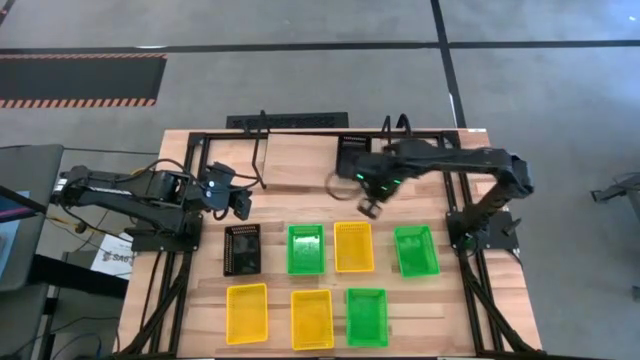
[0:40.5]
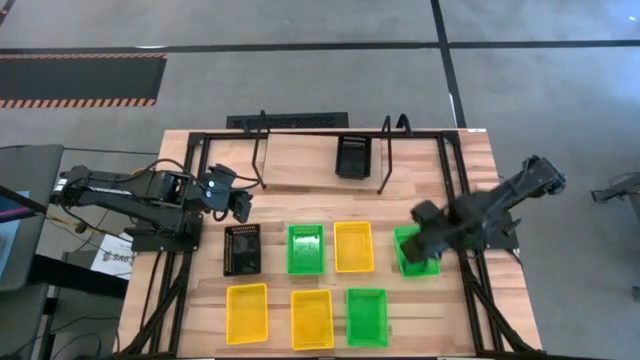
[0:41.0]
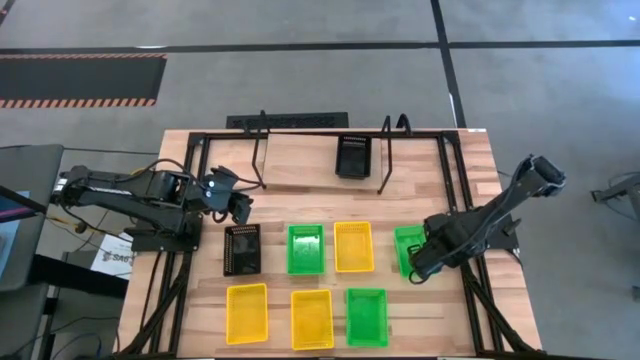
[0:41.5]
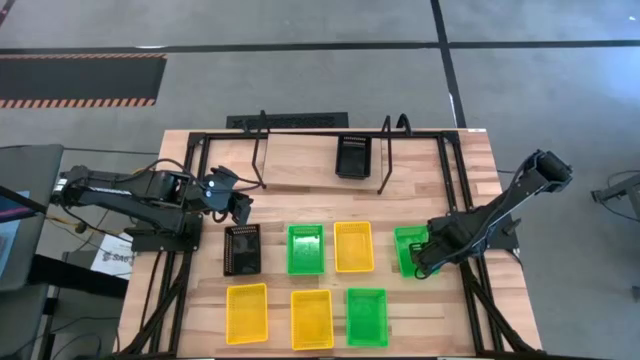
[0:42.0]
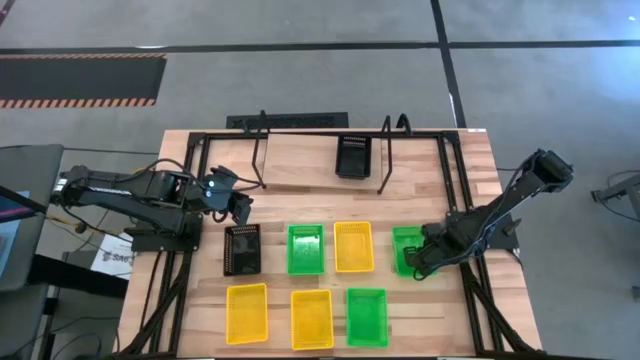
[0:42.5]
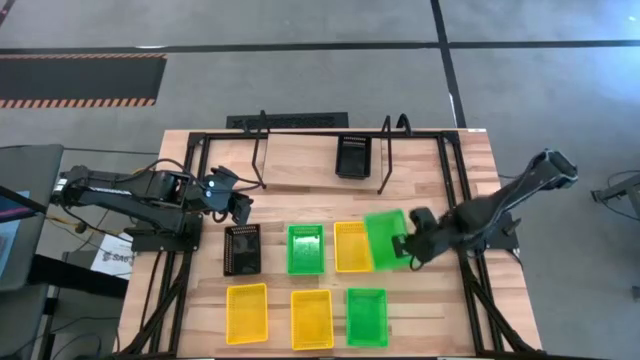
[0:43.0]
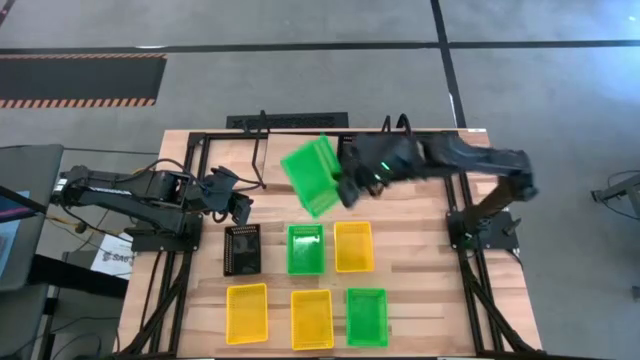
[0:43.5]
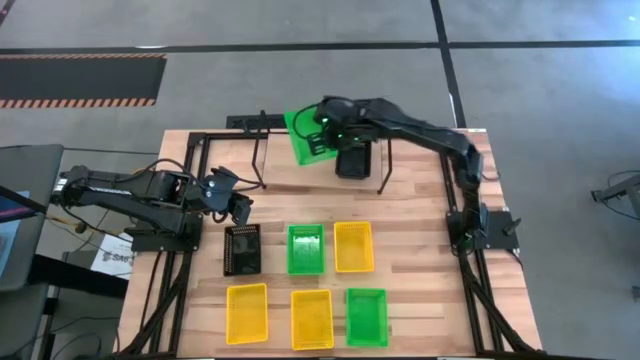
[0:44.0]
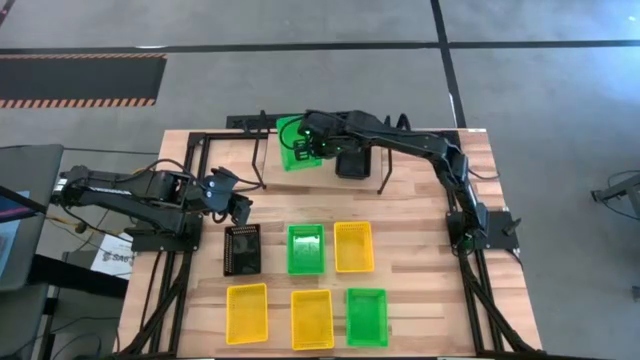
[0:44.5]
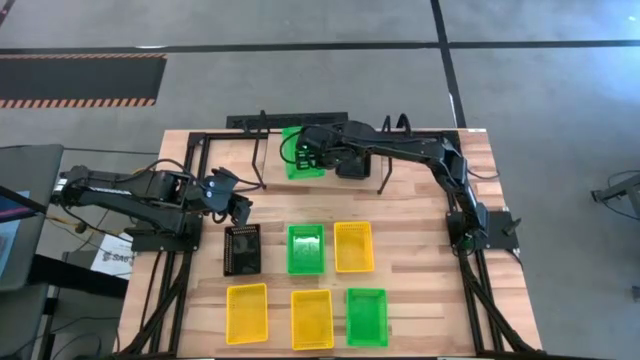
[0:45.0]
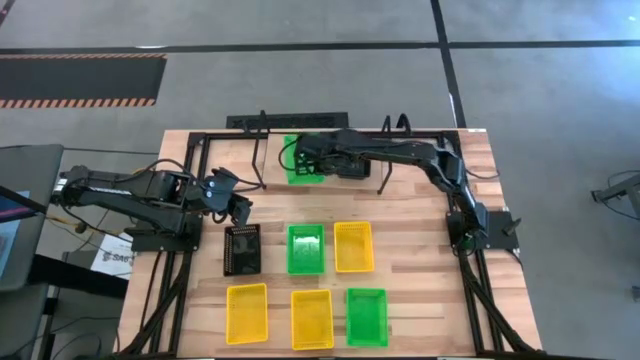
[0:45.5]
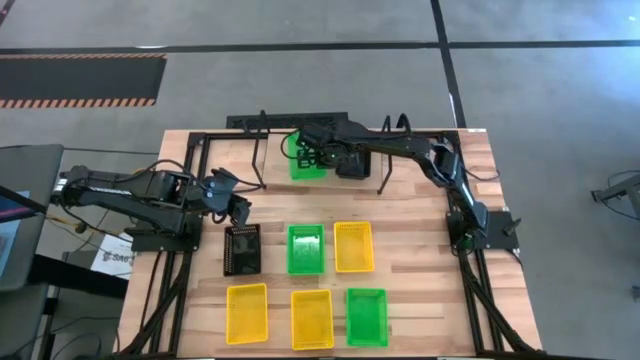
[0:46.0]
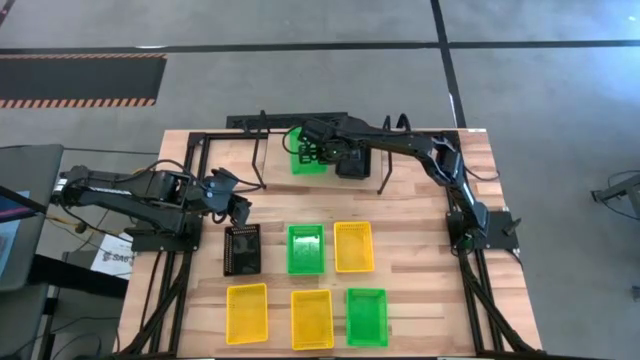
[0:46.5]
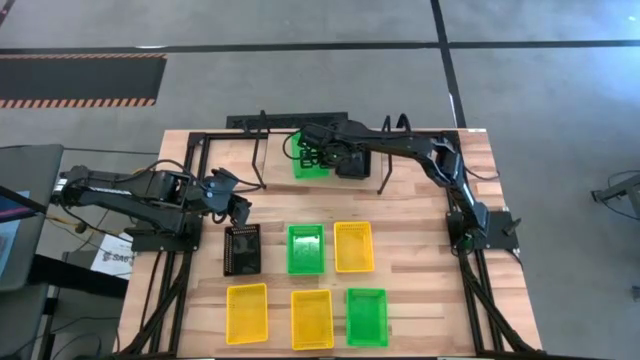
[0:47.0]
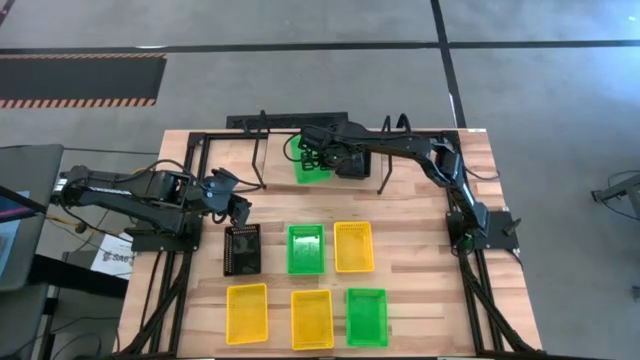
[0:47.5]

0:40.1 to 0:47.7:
Task: Stack baskets on shelf by color
Put the right green basket on top of the black basket on the shelf

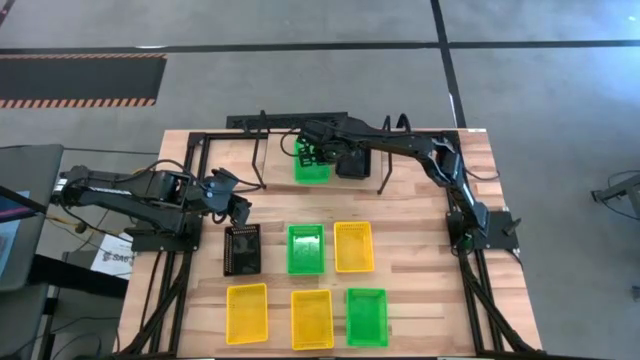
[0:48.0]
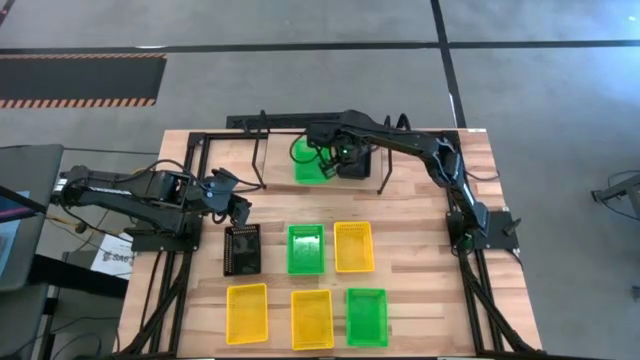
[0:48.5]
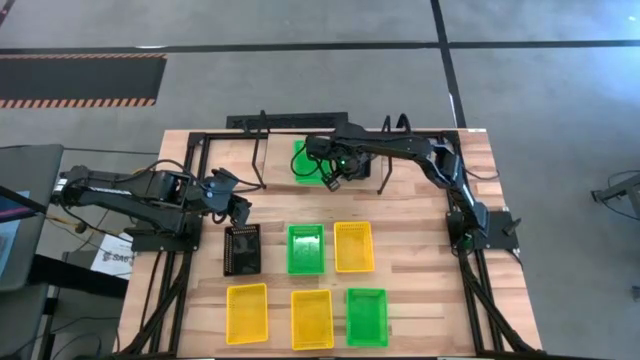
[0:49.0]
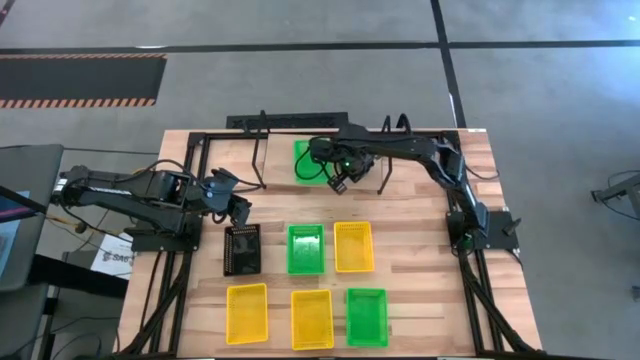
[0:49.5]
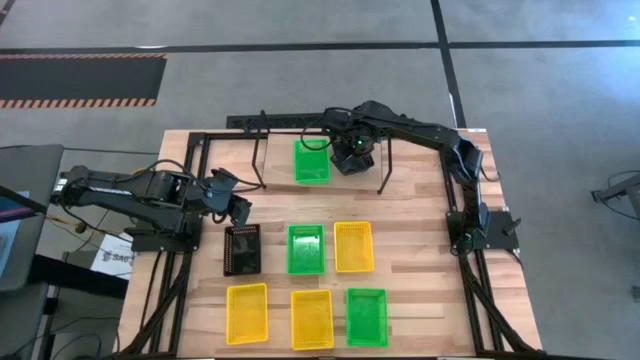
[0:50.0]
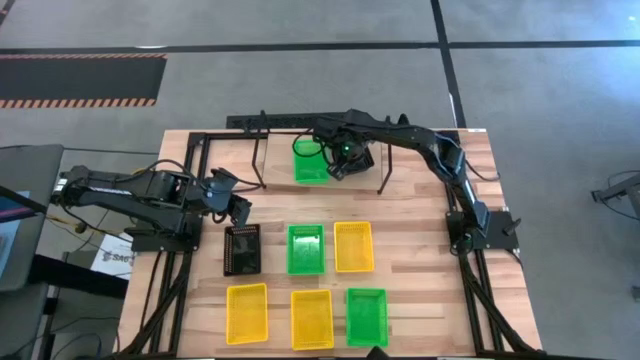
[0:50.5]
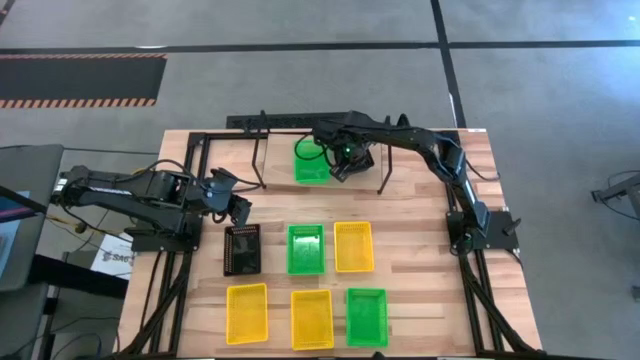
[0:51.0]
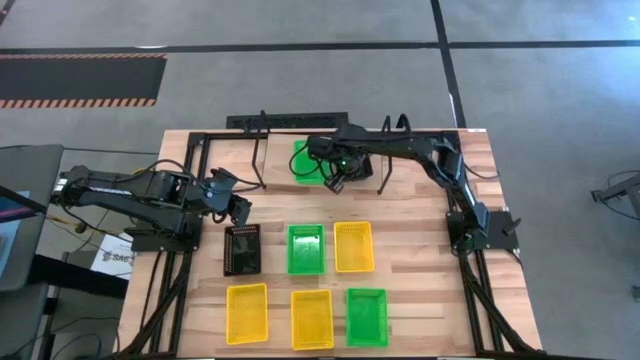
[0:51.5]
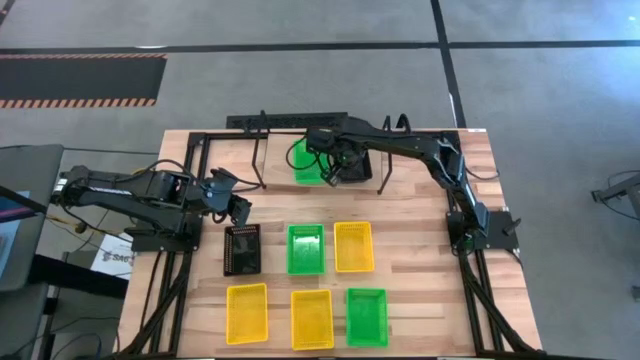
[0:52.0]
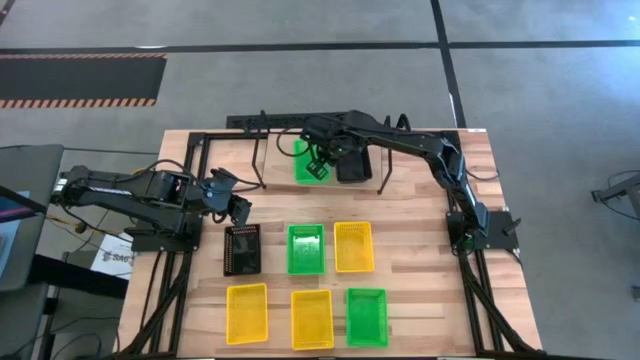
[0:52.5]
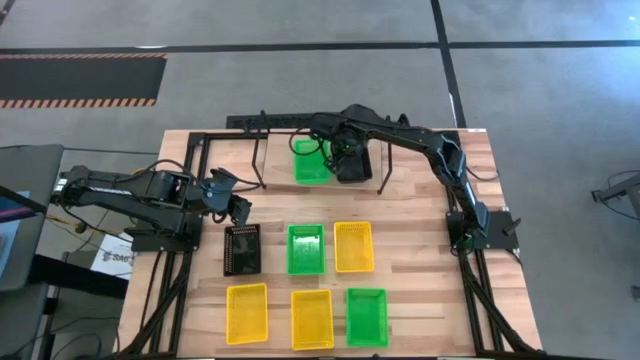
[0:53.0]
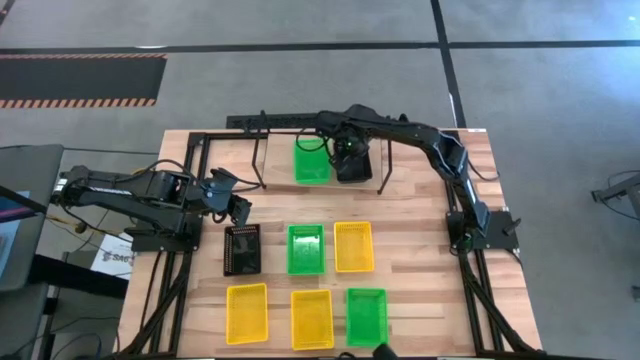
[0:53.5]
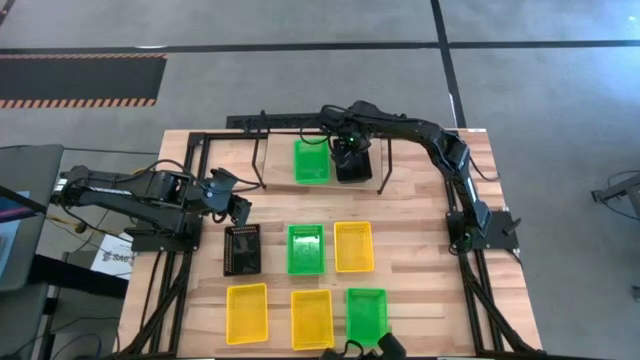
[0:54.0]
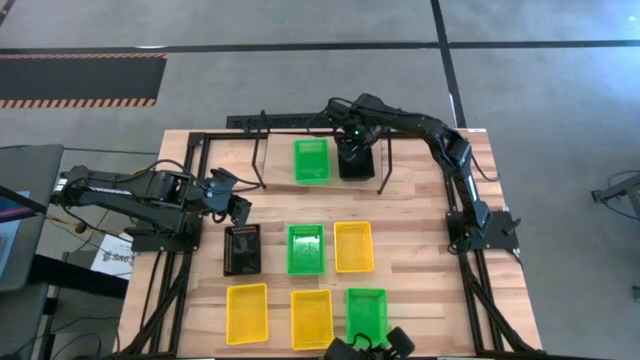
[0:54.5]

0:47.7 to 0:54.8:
Adjust the black basket

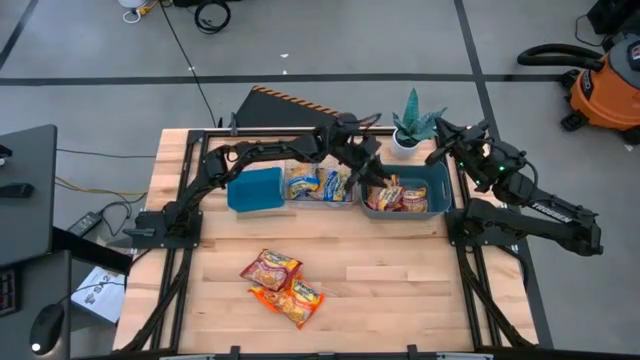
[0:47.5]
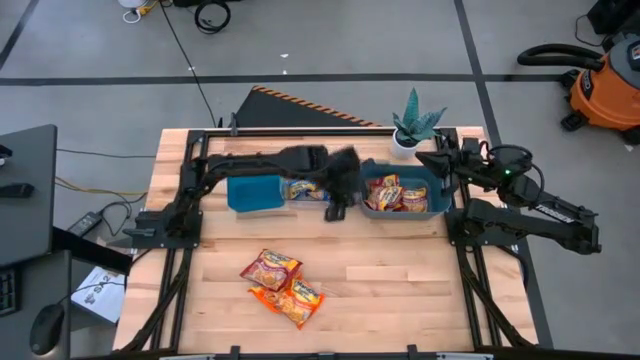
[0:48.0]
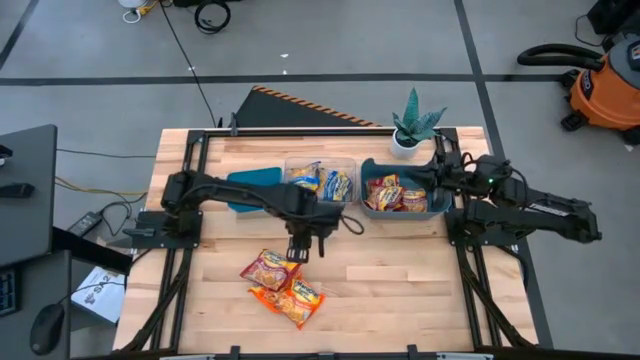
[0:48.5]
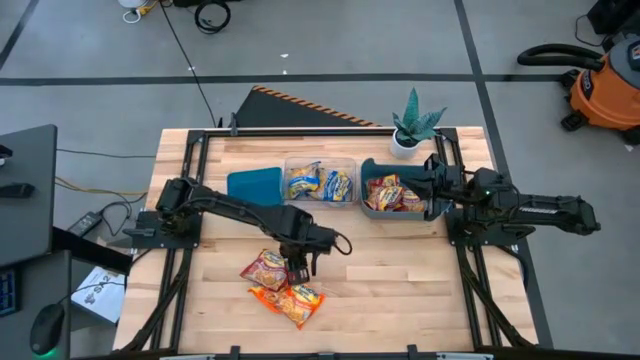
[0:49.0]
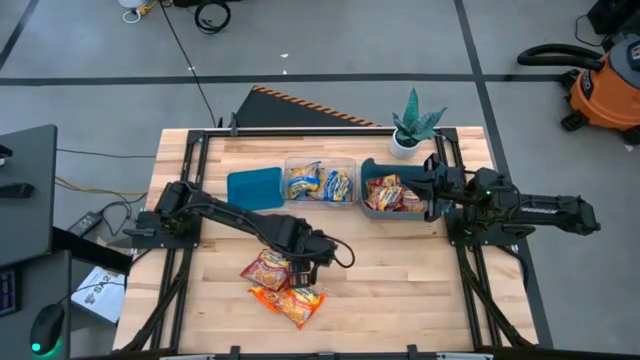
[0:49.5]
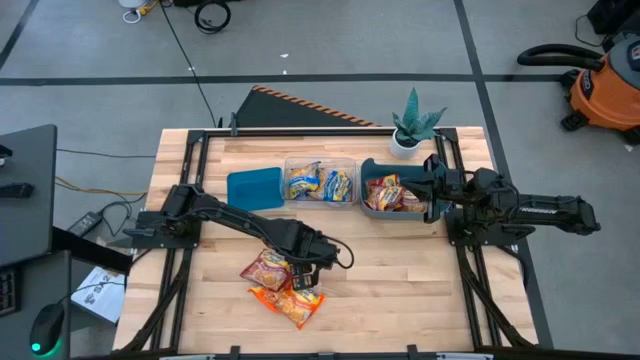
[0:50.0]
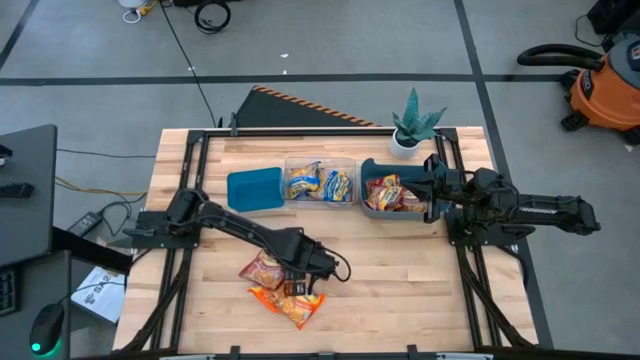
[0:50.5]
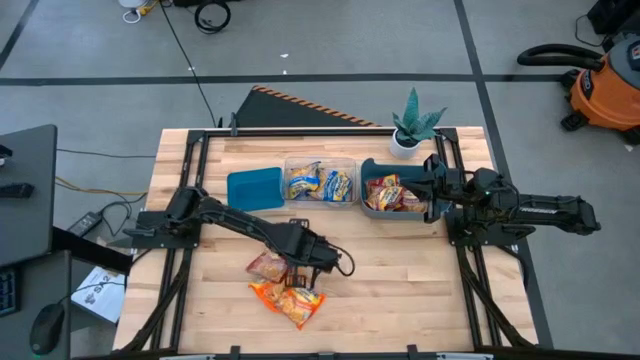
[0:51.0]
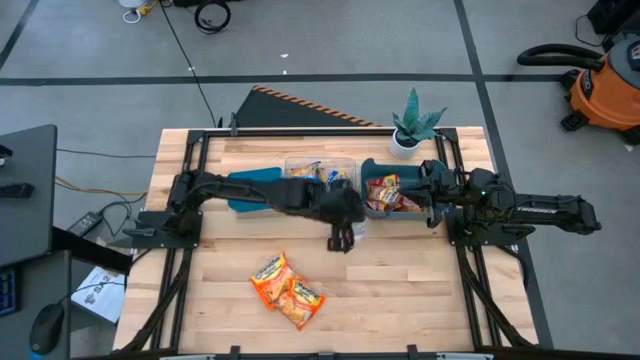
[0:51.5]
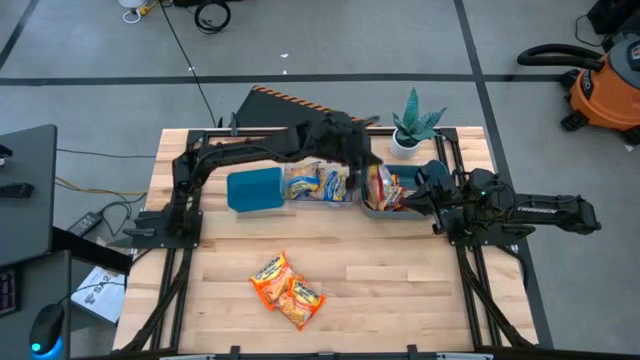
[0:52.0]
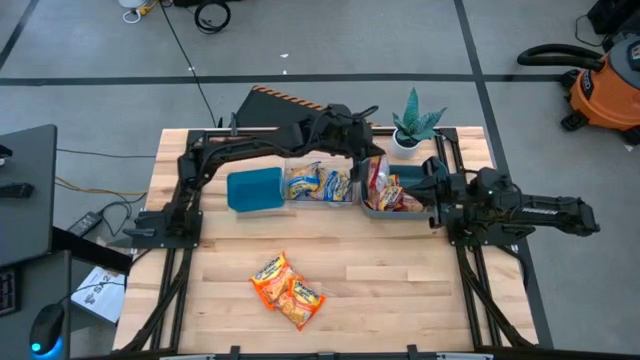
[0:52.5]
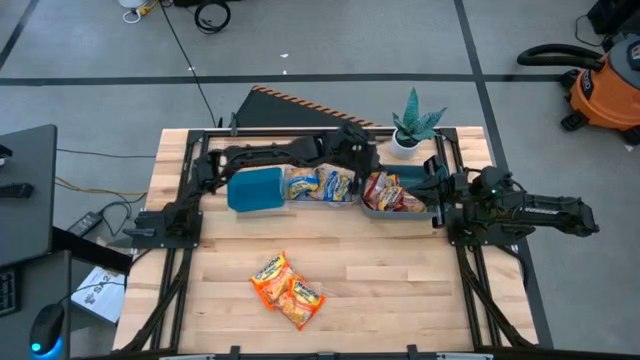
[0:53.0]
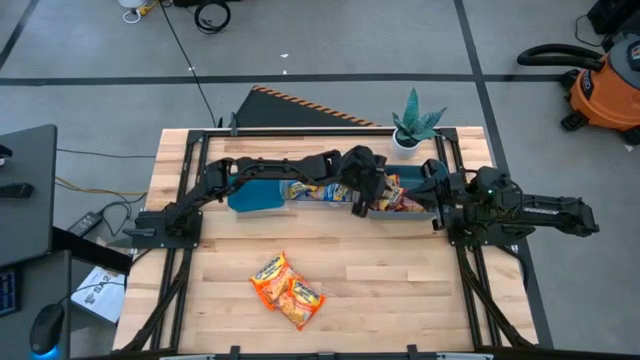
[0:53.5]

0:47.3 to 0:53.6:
Task: Sort Maruchan noodles
Put the red noddle pack into the dark blue bin

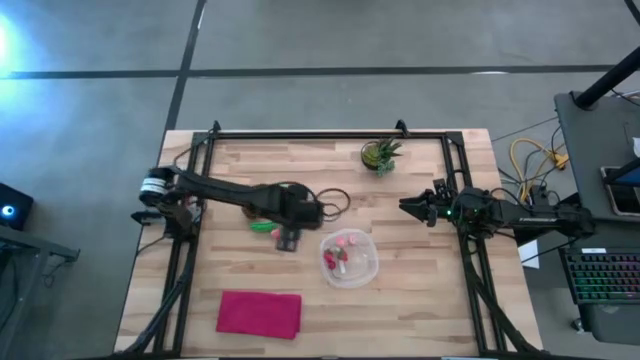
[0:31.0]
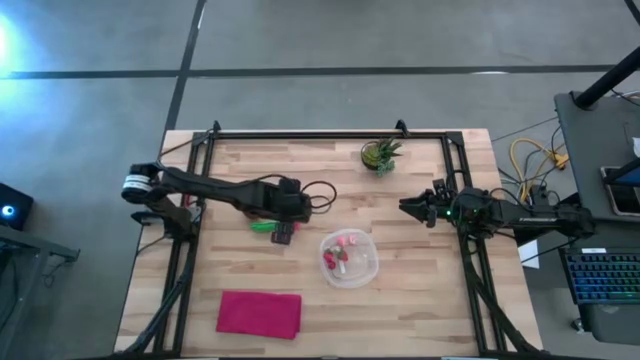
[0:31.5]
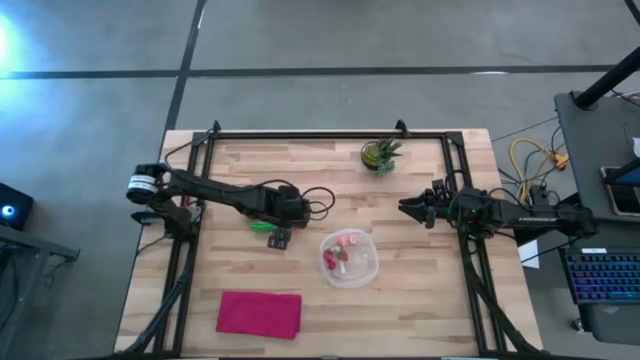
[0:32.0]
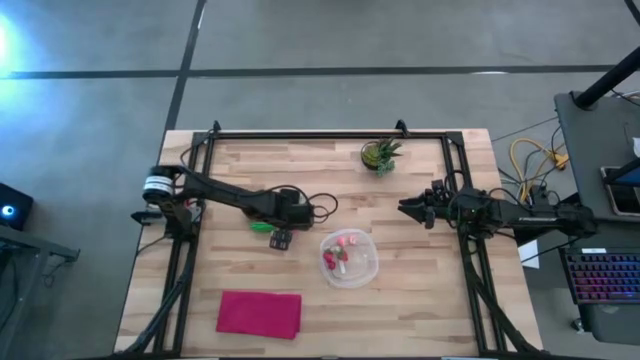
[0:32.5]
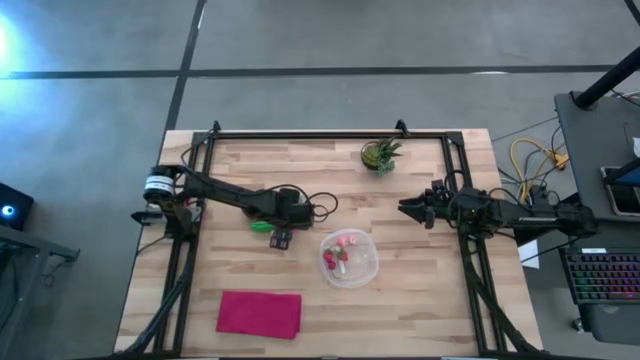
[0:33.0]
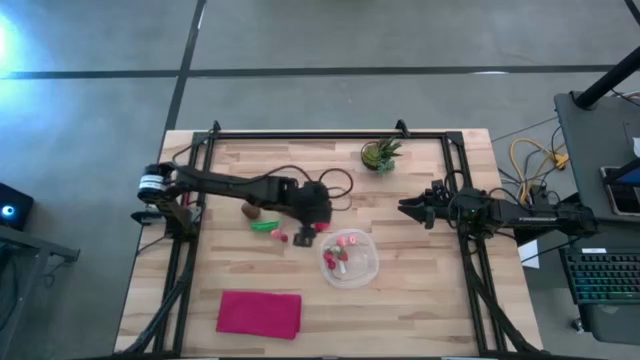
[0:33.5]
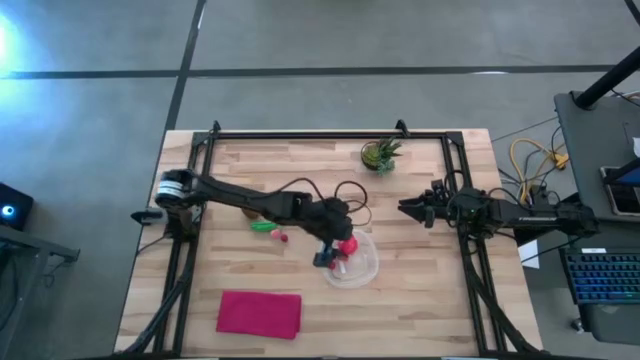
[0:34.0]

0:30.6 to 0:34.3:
Task: Pick and placing Produce into tupperware
Put the tomato into the container
